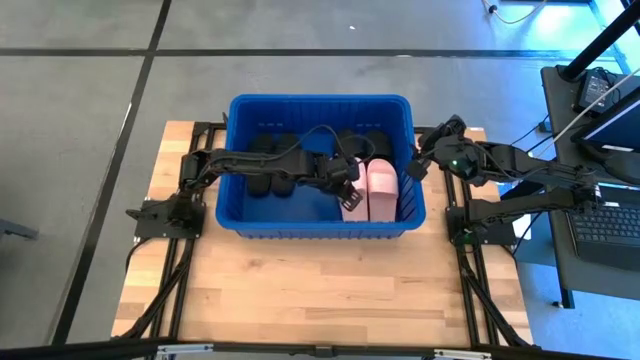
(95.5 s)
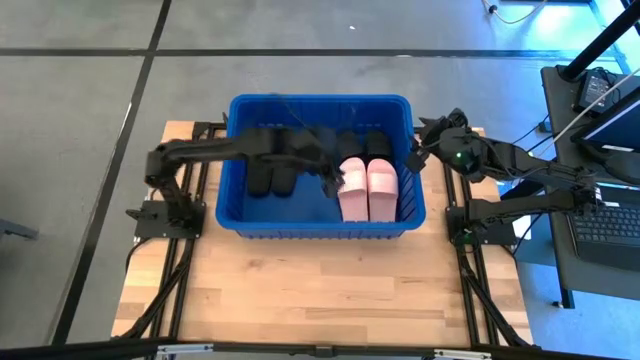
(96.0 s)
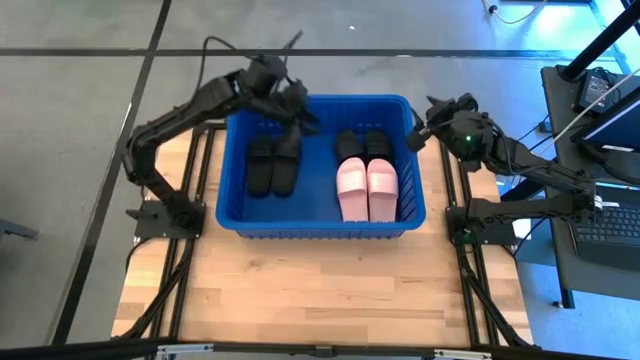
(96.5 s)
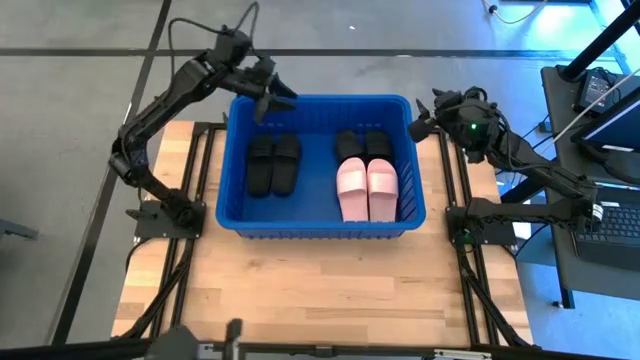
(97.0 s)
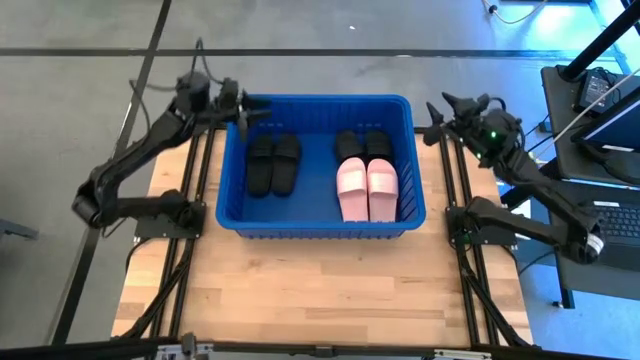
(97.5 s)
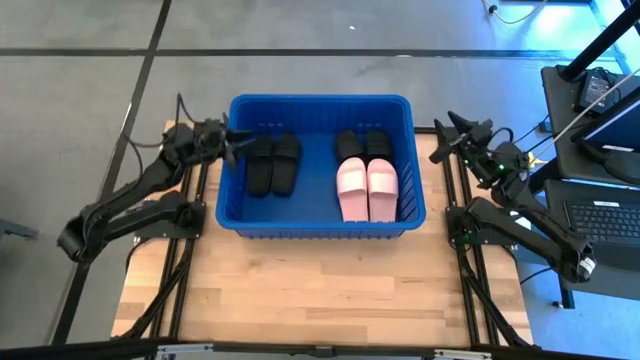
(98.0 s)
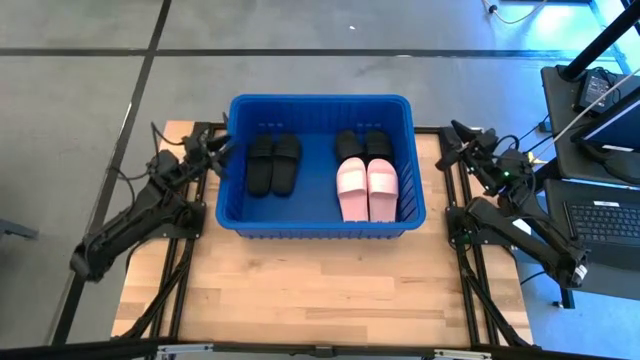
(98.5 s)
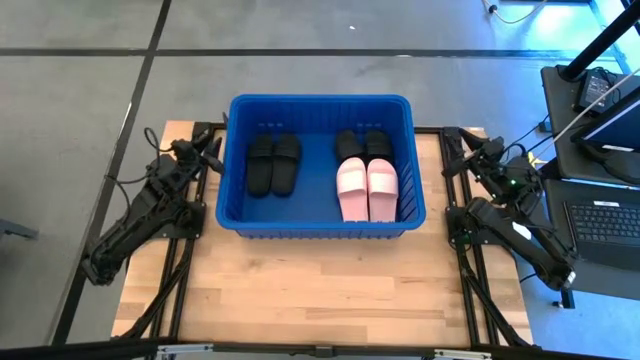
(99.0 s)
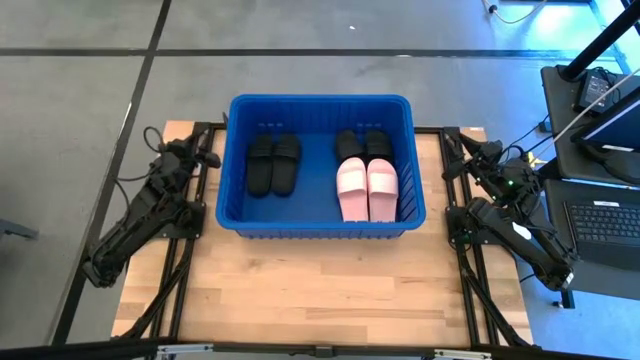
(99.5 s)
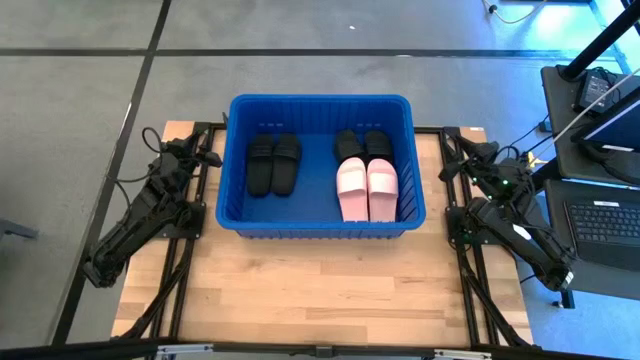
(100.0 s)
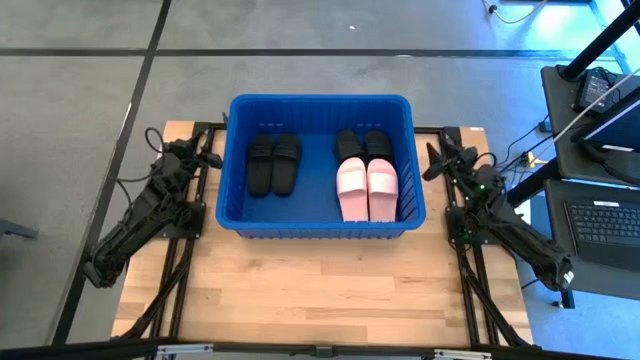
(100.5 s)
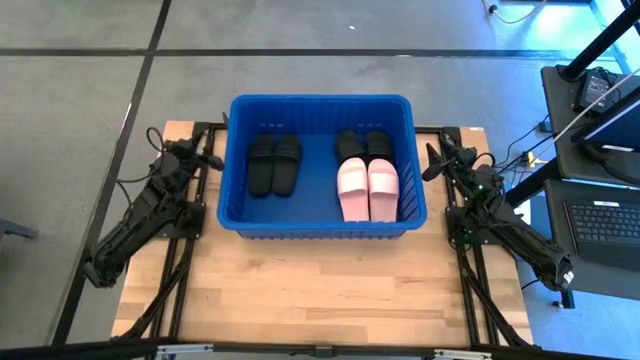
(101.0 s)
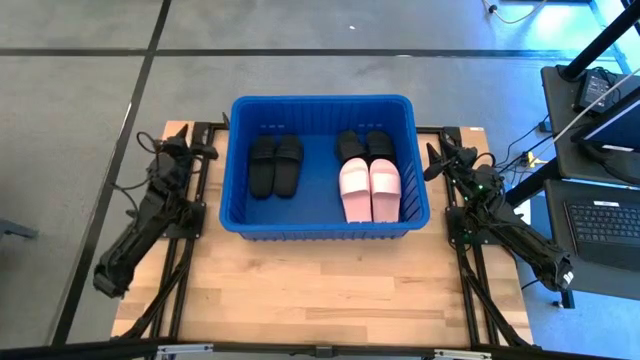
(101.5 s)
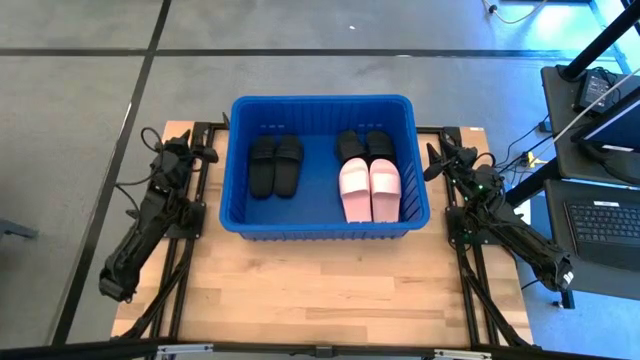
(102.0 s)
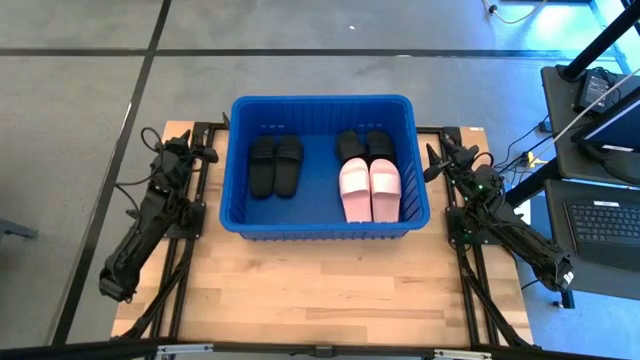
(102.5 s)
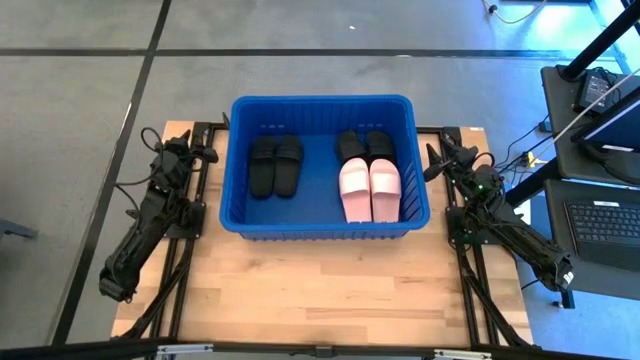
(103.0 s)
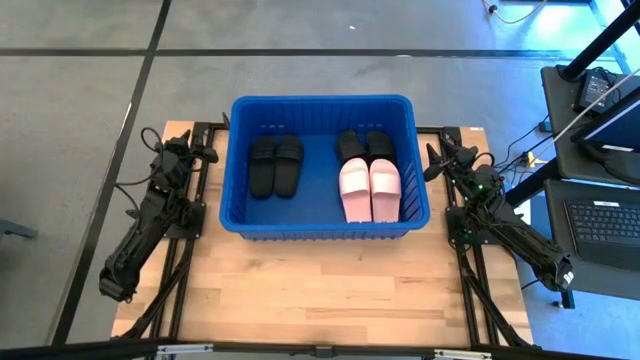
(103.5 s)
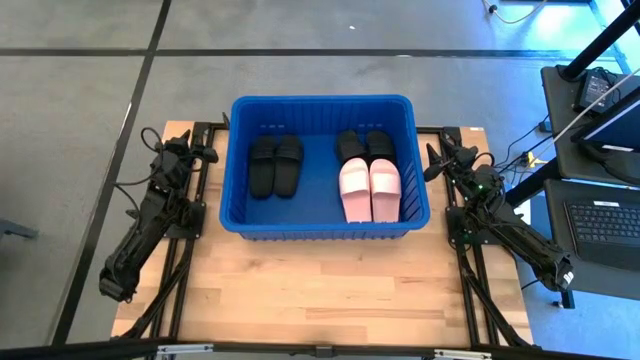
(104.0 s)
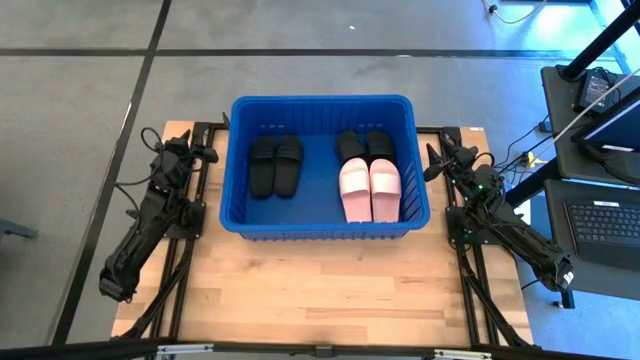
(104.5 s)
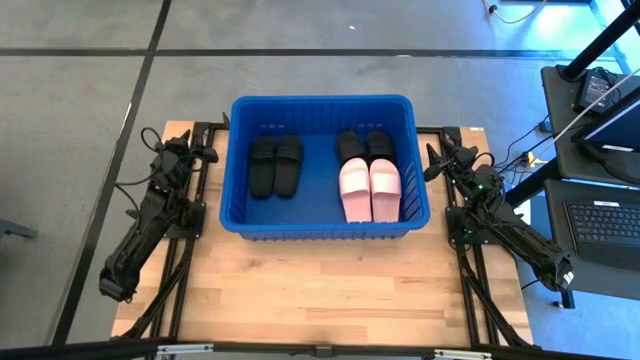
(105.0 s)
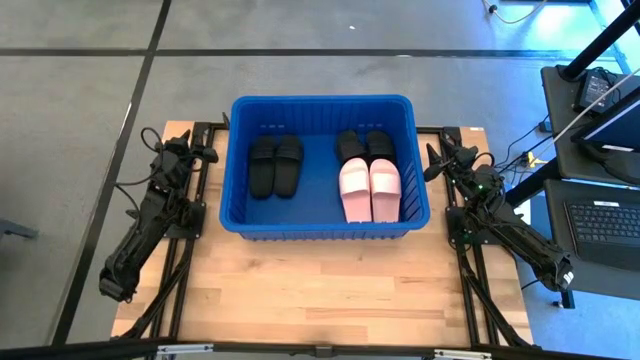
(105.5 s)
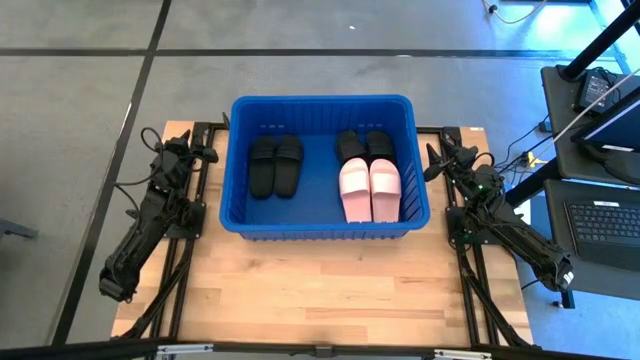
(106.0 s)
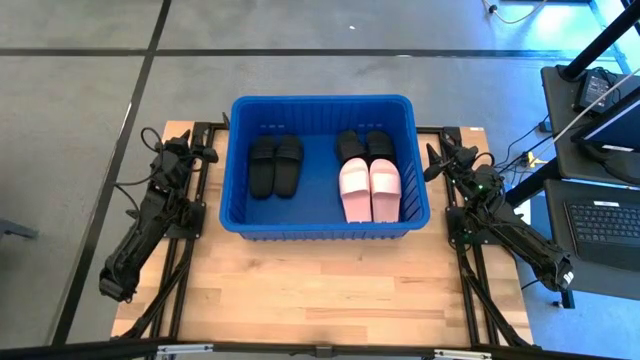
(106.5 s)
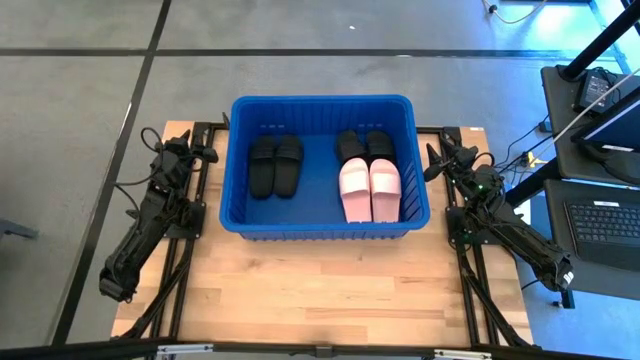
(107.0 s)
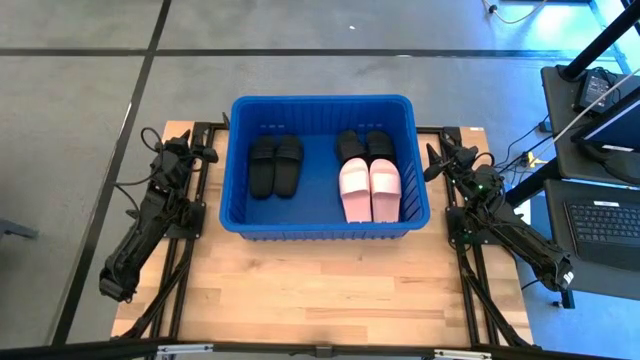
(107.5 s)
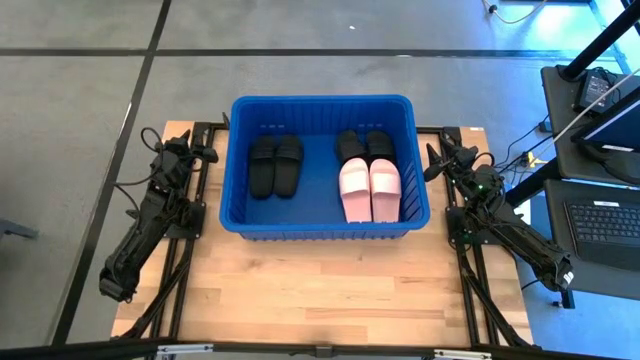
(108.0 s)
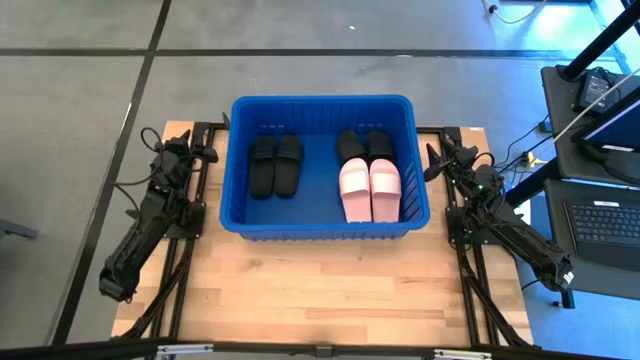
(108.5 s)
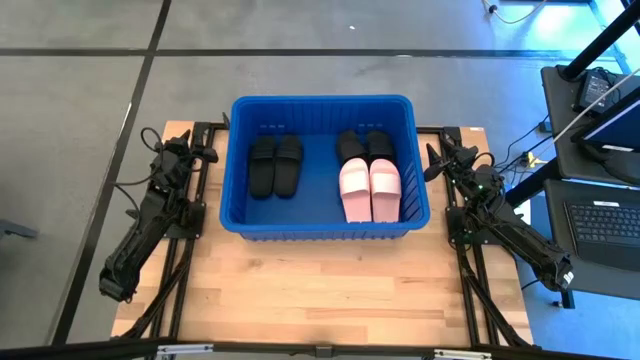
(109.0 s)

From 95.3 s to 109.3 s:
Task: Pick and place slides into bin
Return to home position

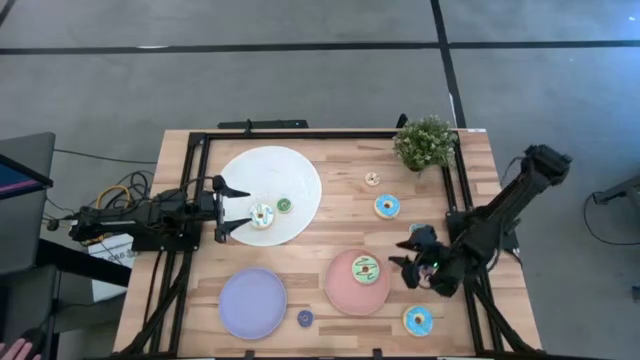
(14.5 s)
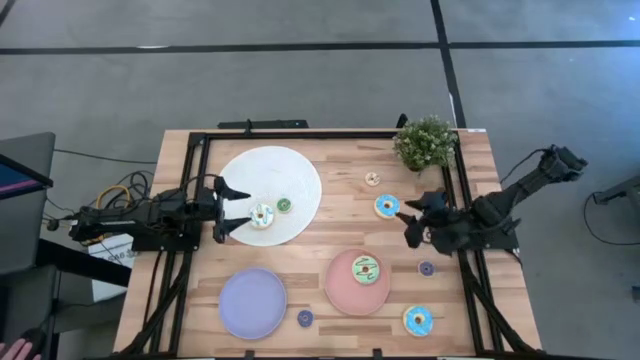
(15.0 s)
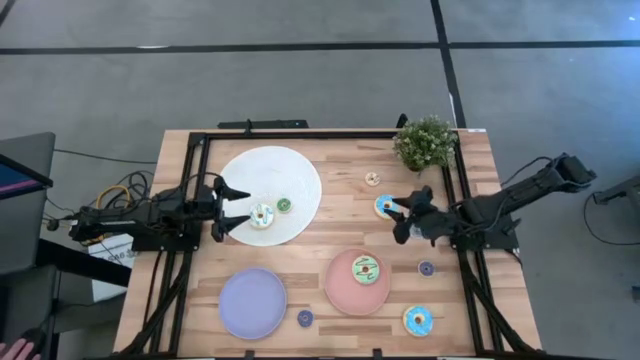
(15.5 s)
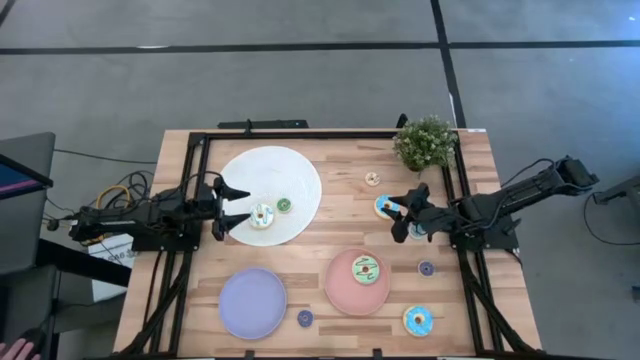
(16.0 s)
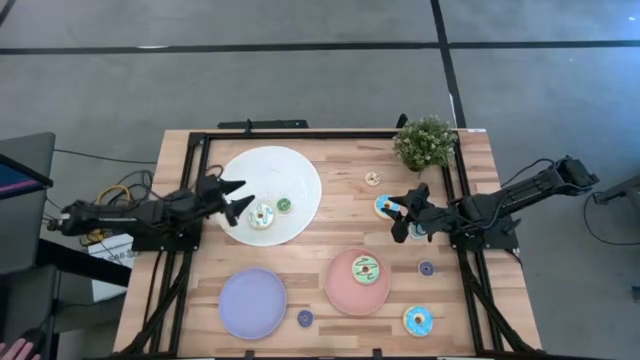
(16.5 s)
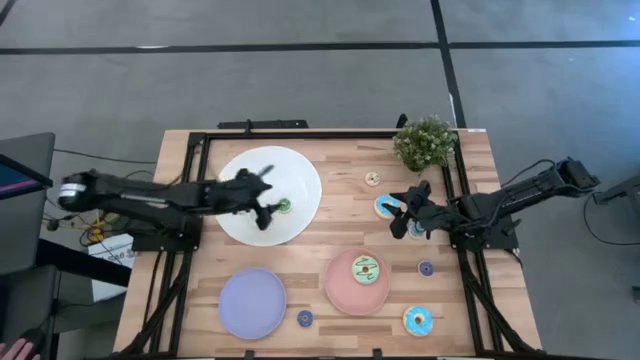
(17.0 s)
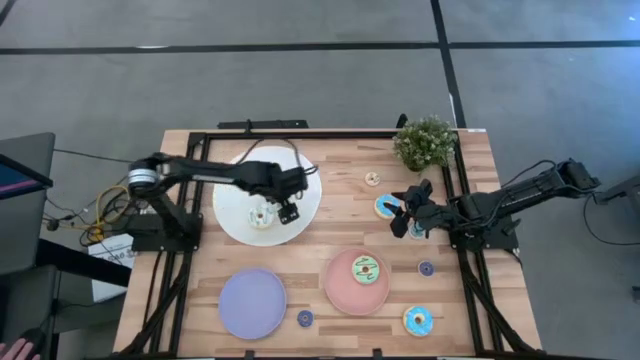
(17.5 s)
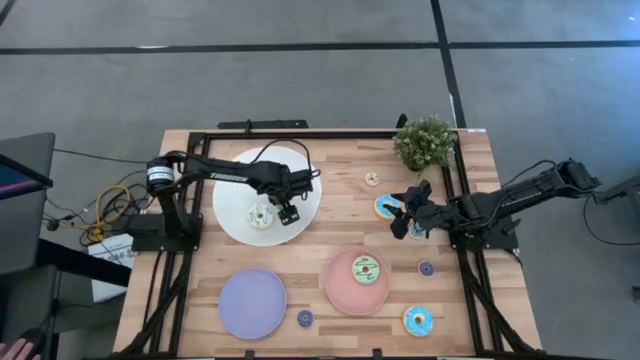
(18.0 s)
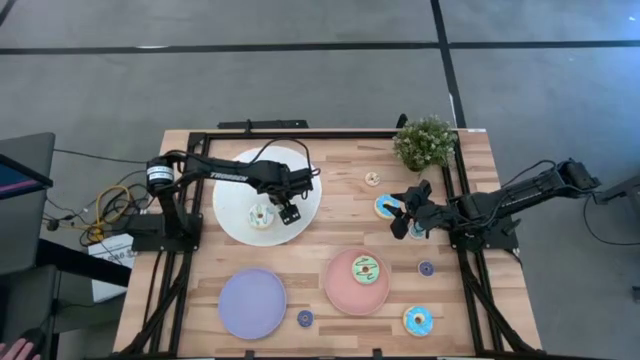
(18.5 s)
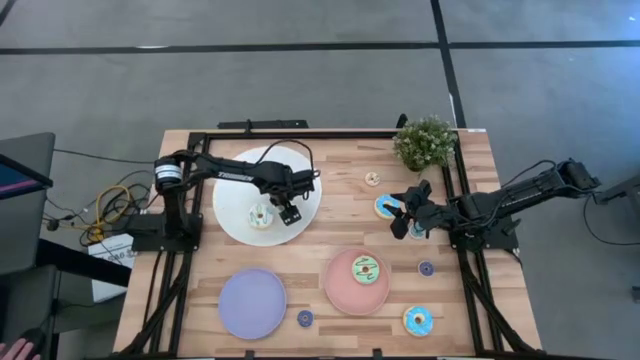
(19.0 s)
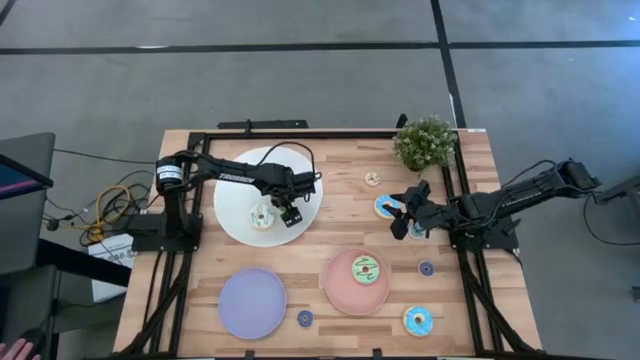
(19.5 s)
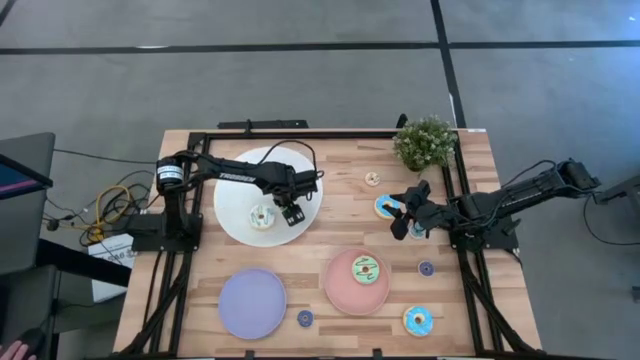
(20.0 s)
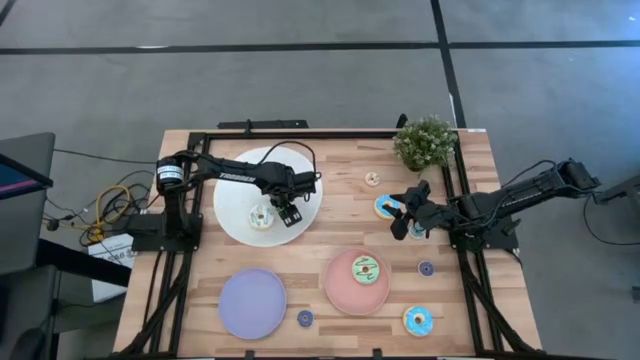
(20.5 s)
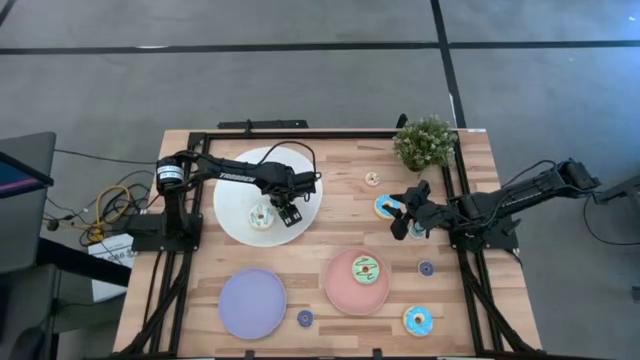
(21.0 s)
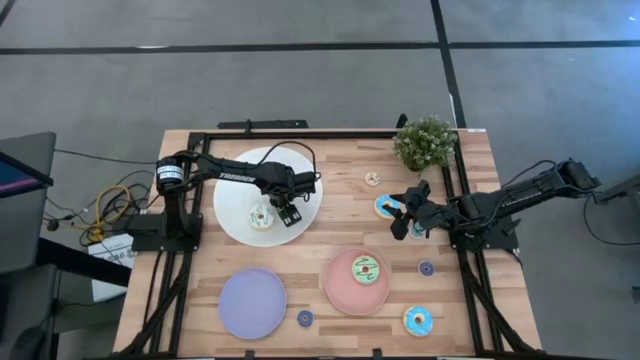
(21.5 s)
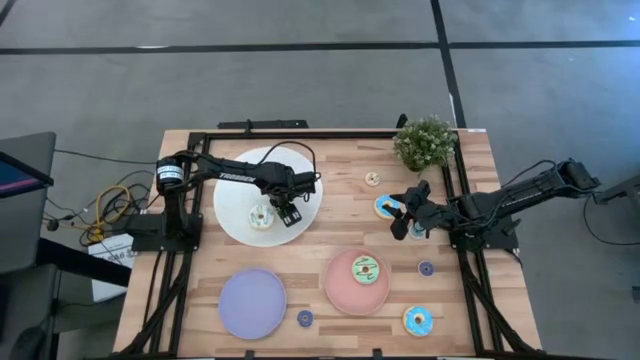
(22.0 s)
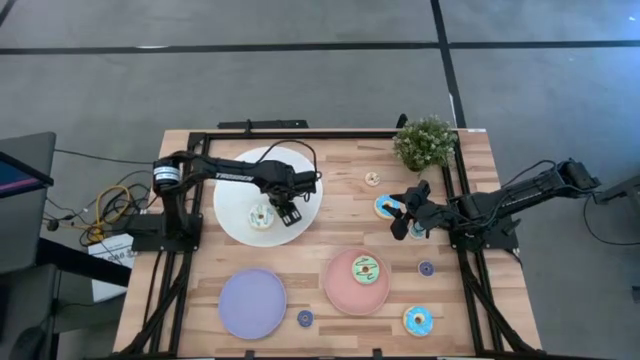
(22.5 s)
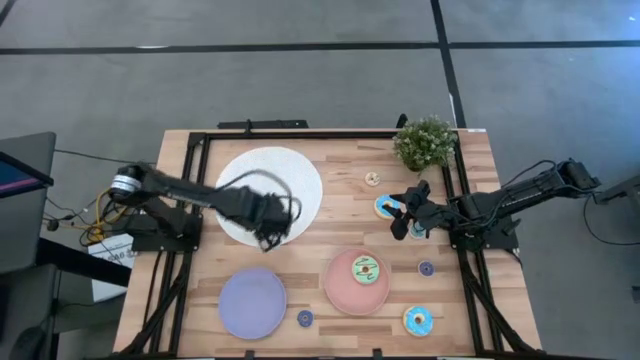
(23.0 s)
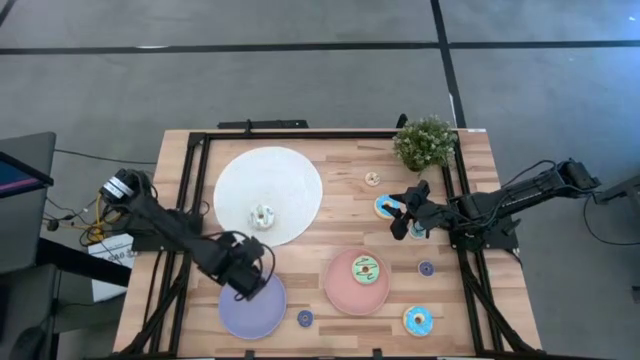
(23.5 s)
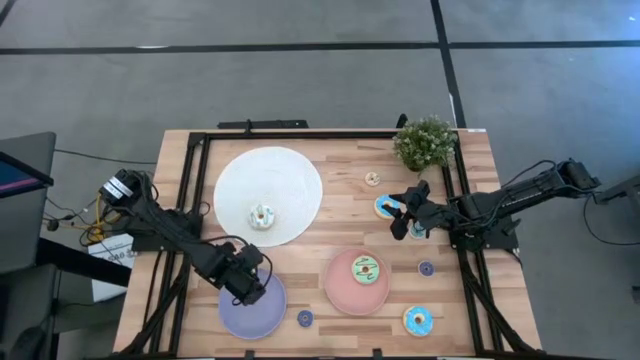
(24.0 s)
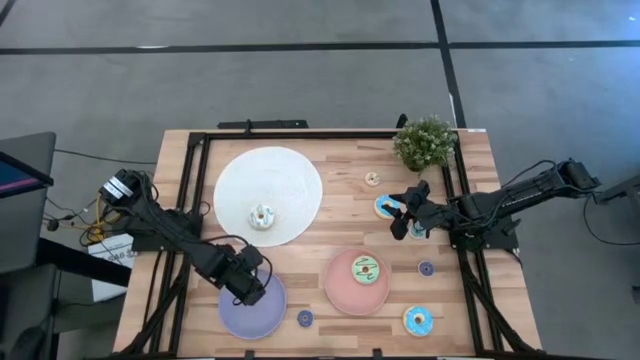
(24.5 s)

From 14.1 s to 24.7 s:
Task: Pick & Place donuts
Put the small green donut on the purple plate
